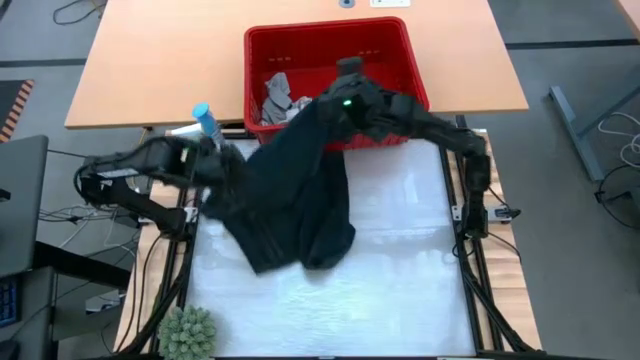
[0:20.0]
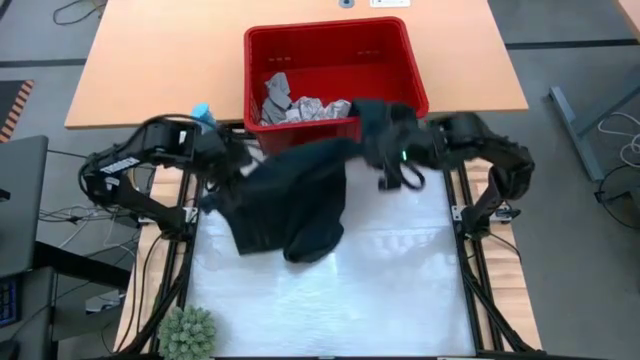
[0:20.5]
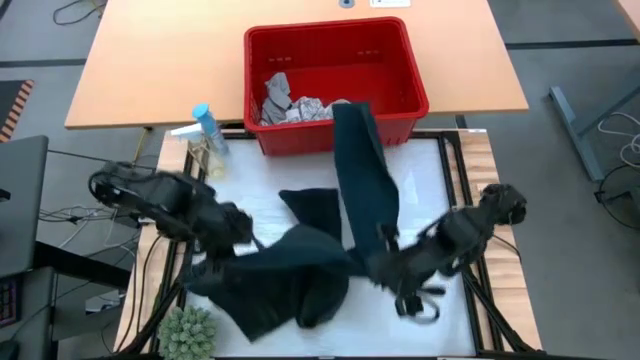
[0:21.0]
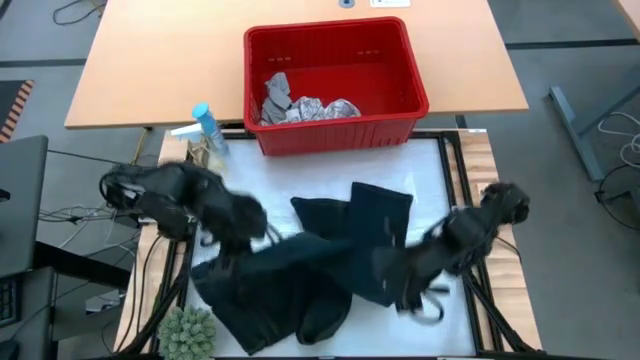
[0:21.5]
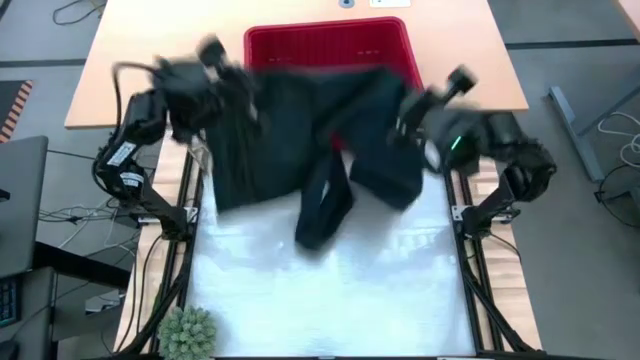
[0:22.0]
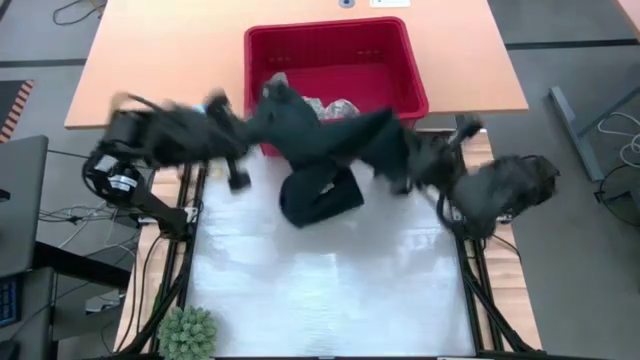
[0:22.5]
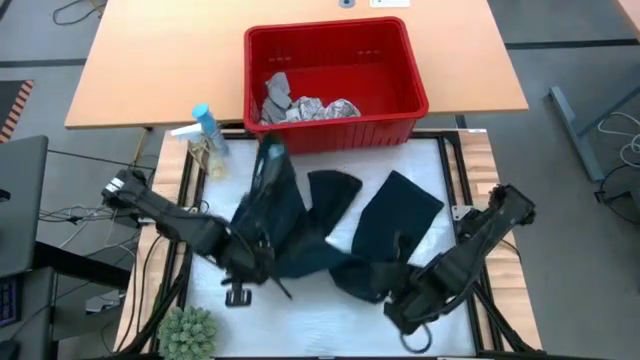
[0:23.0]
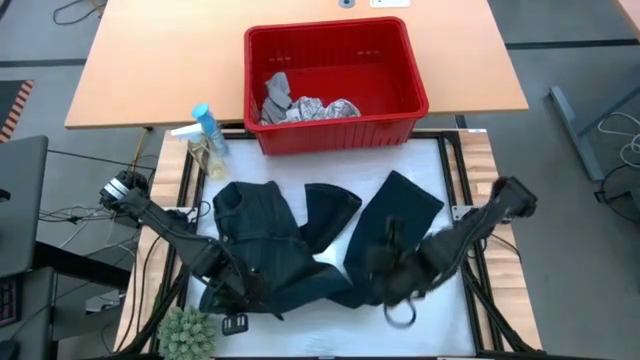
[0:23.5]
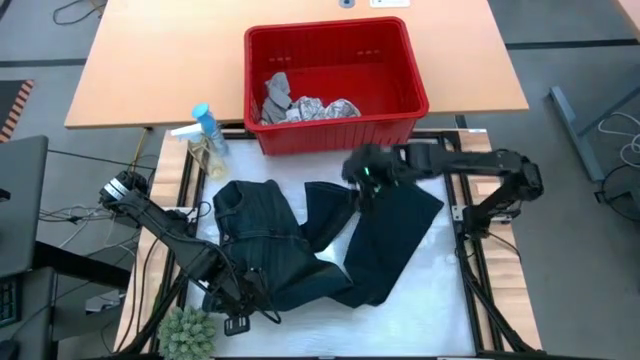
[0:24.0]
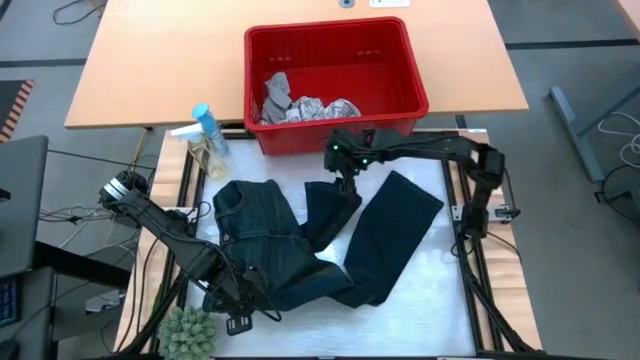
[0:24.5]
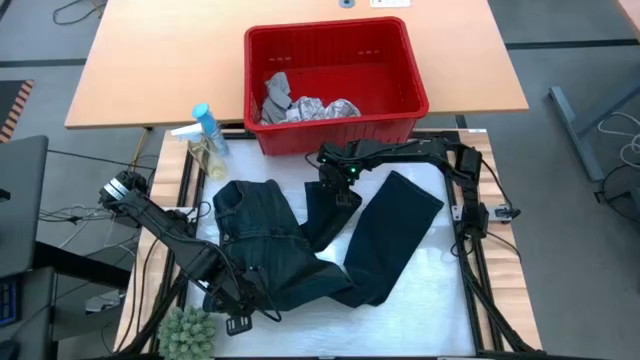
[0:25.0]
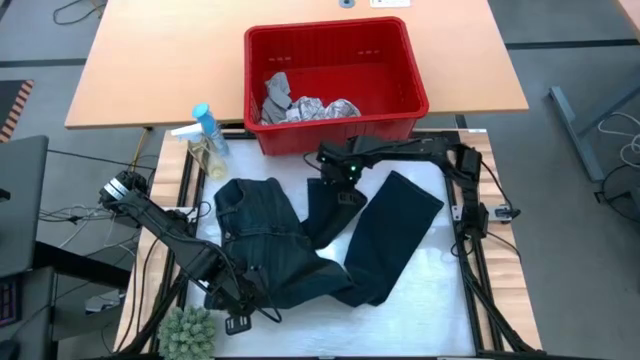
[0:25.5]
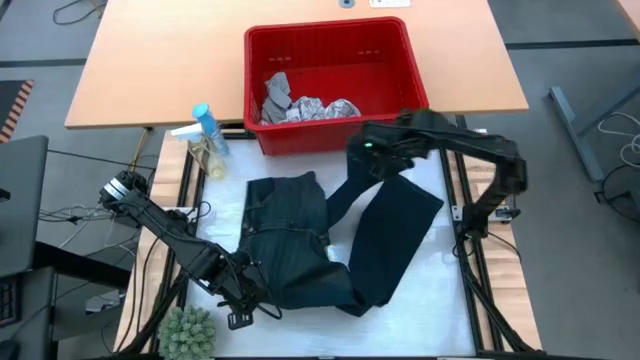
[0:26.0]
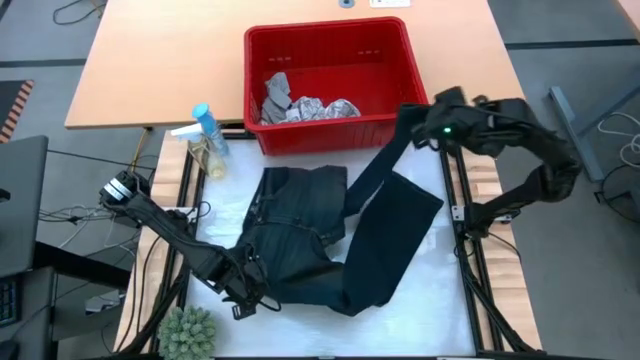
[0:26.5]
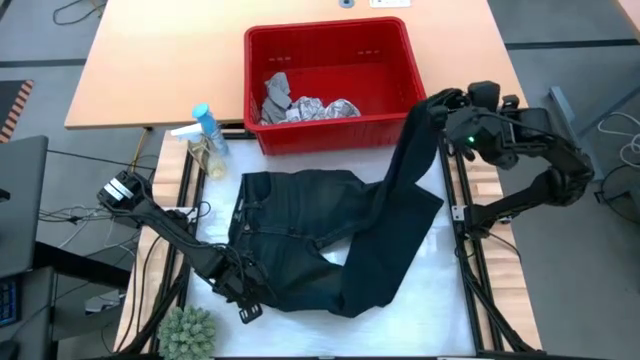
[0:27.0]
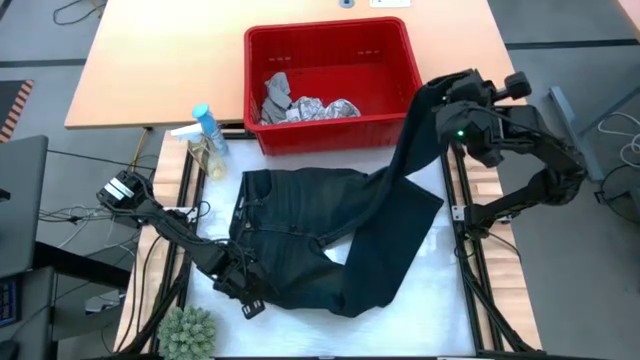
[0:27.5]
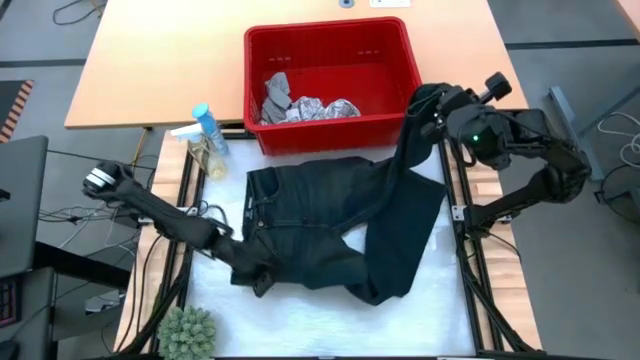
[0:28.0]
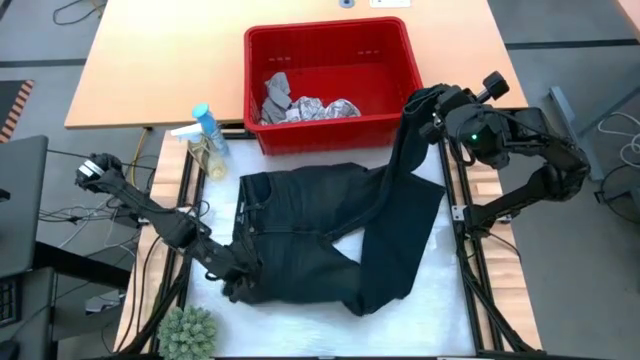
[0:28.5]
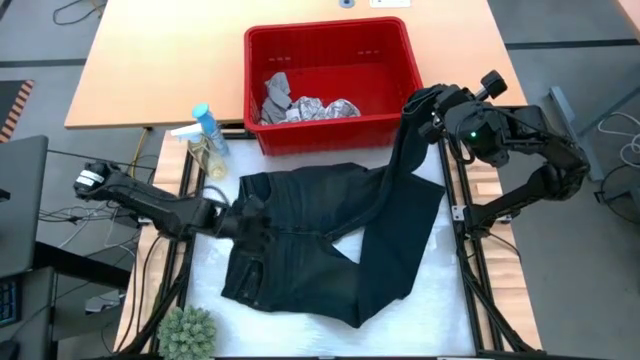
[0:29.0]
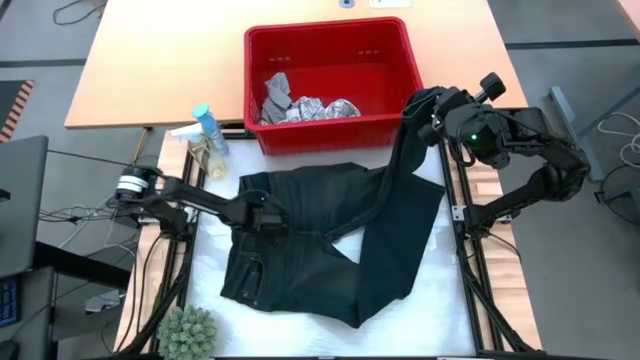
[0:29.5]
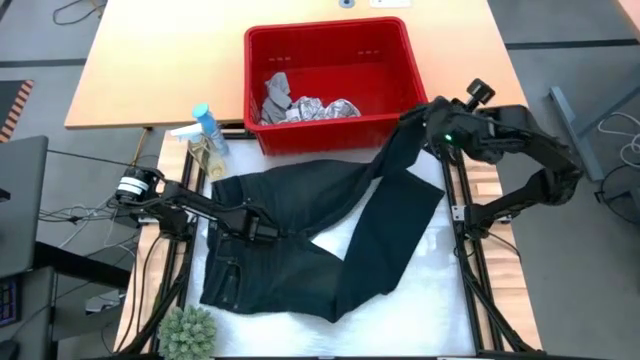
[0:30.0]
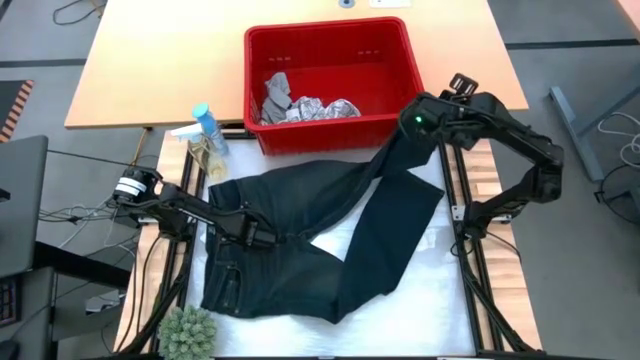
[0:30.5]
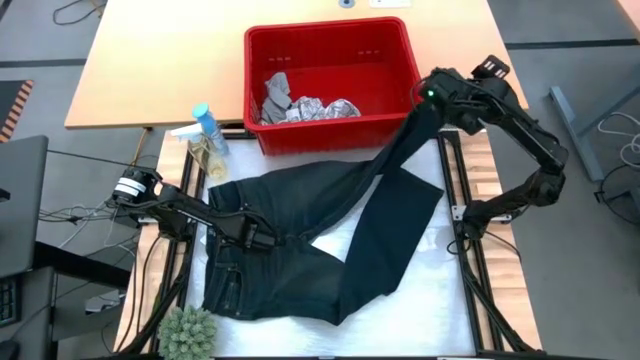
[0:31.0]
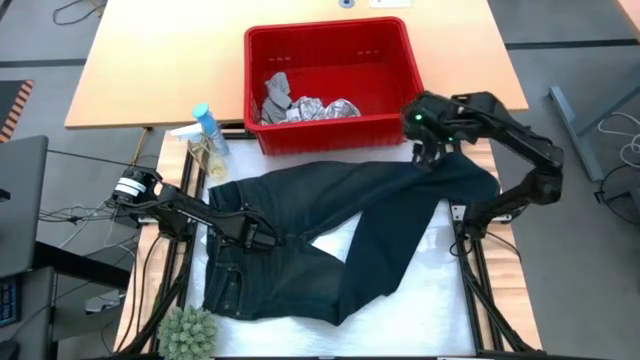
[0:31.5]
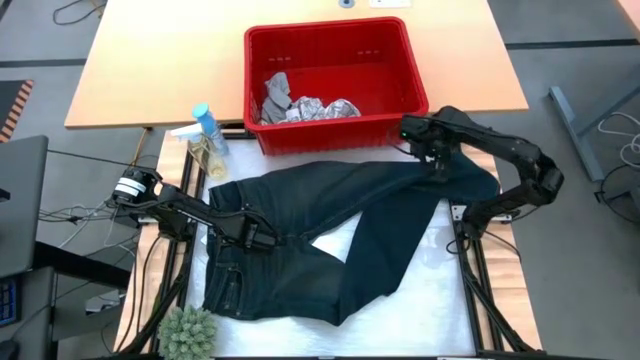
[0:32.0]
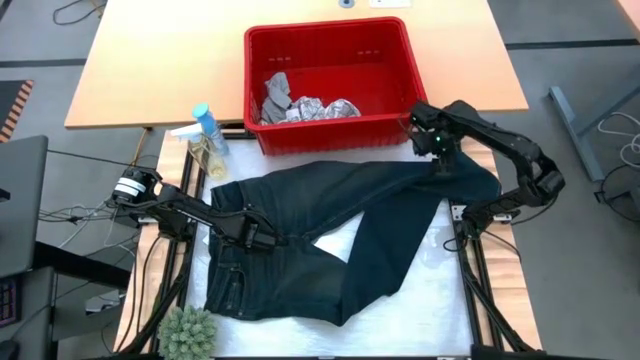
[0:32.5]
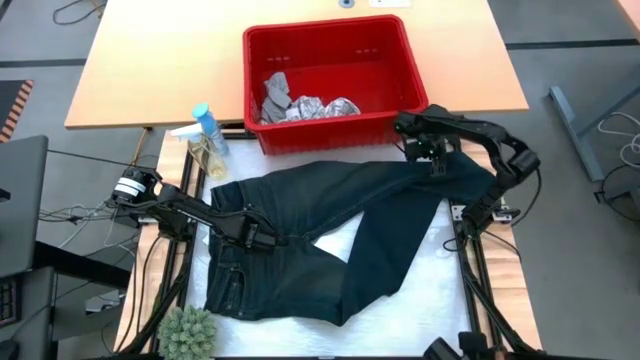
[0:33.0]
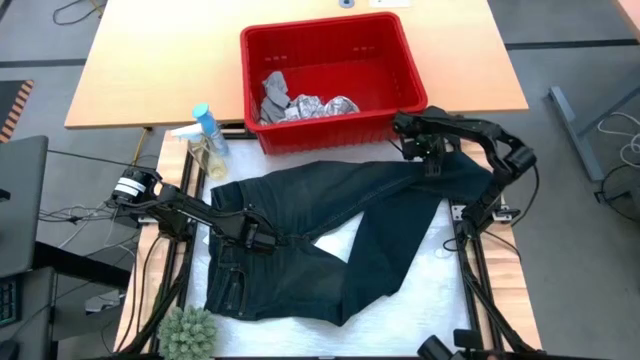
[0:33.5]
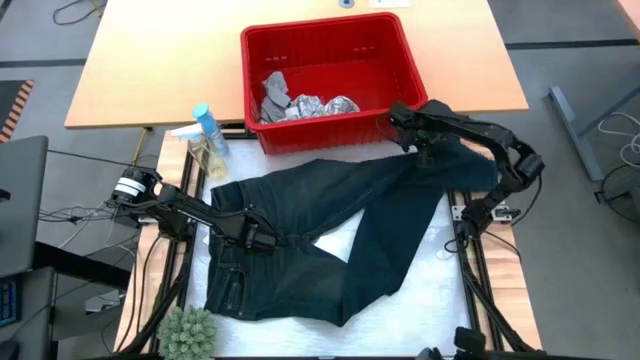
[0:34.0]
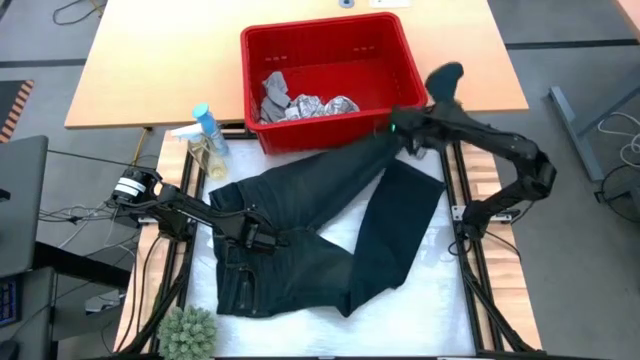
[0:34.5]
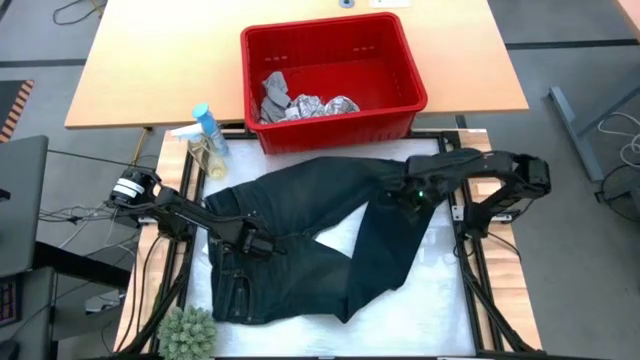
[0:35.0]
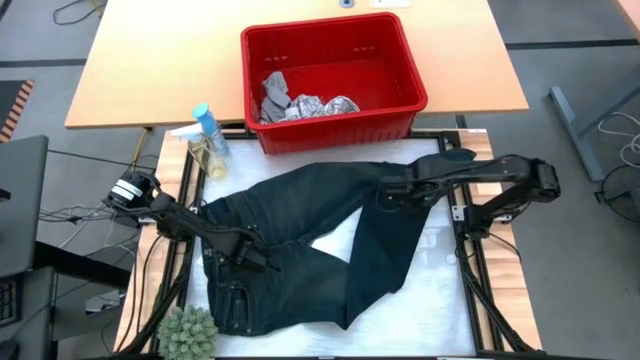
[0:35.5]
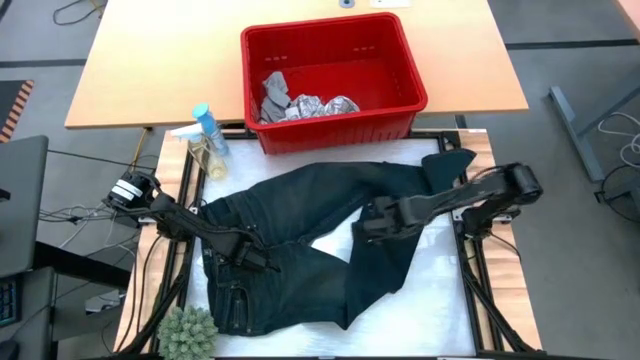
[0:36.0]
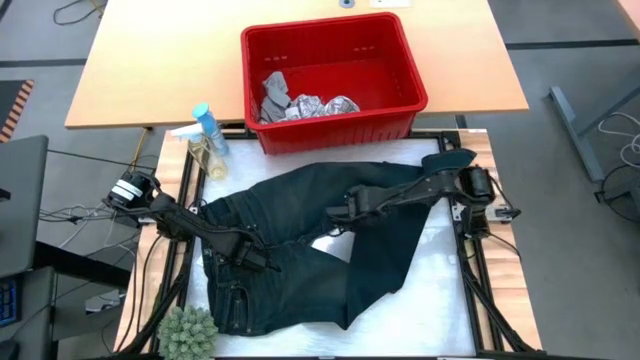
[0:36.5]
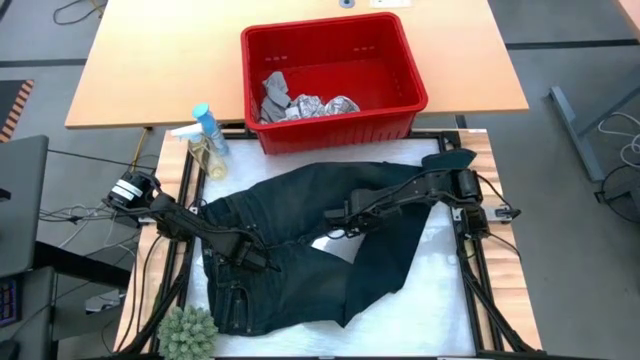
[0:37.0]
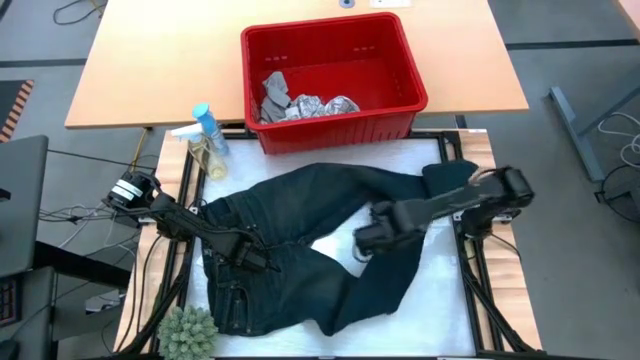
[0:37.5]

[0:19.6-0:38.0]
Task: Fold Laundry from Bin
Fold the blue jeans
